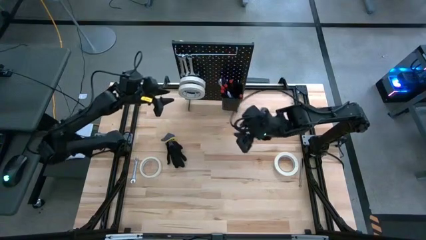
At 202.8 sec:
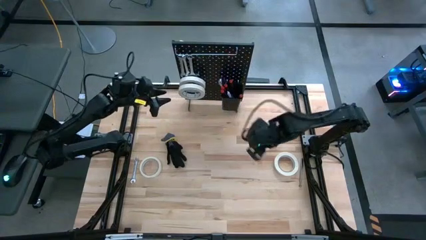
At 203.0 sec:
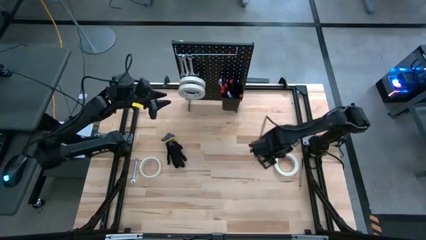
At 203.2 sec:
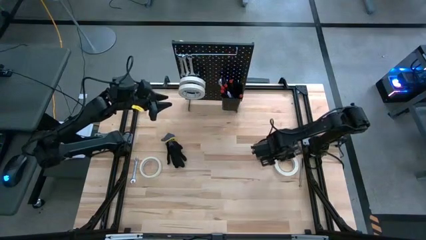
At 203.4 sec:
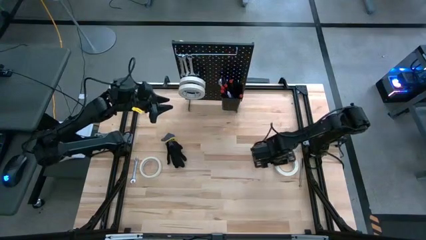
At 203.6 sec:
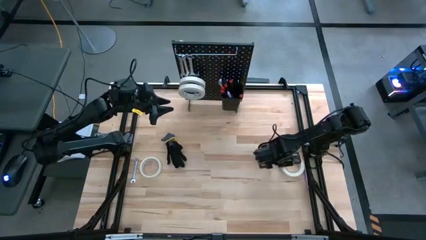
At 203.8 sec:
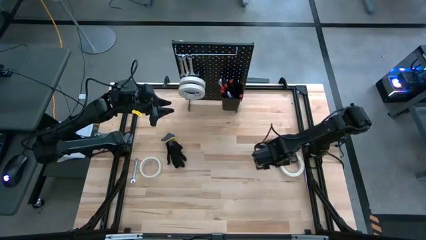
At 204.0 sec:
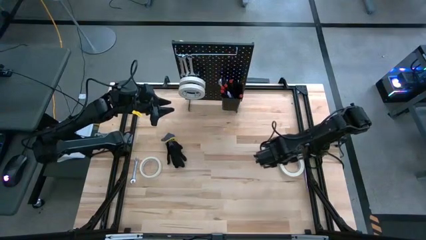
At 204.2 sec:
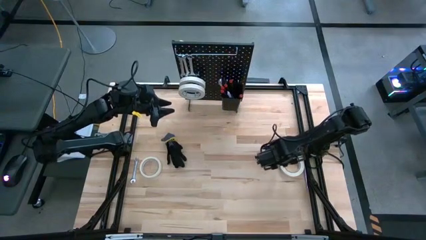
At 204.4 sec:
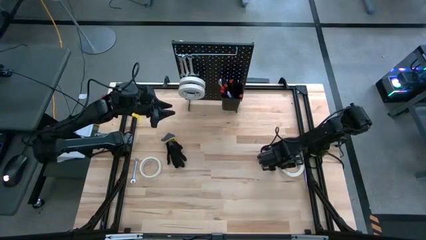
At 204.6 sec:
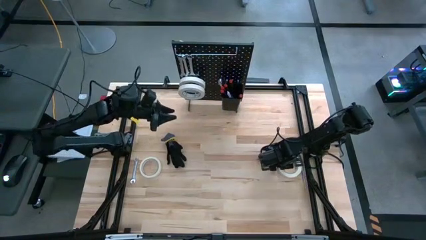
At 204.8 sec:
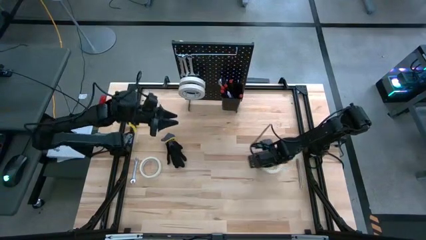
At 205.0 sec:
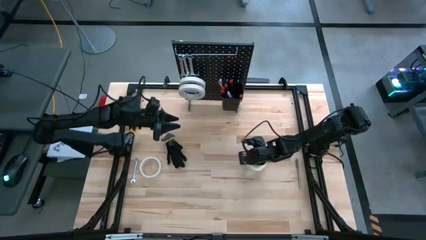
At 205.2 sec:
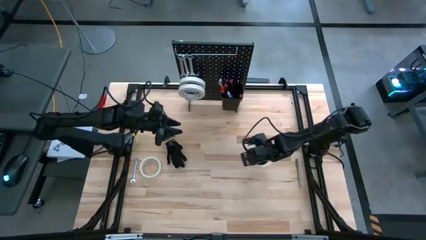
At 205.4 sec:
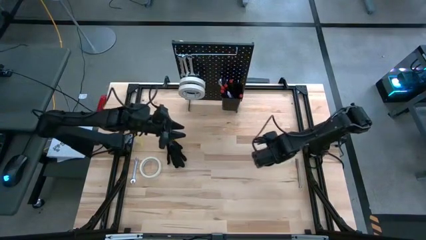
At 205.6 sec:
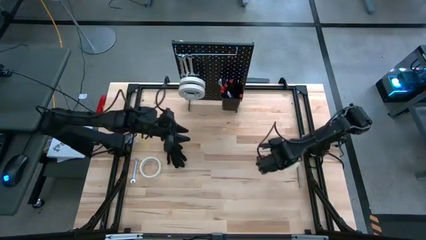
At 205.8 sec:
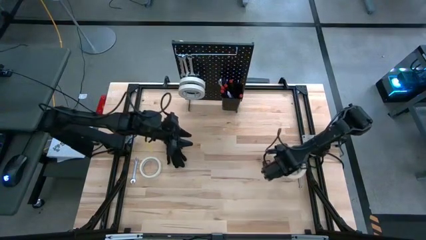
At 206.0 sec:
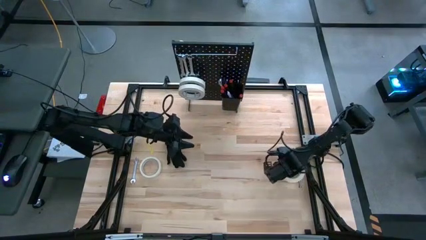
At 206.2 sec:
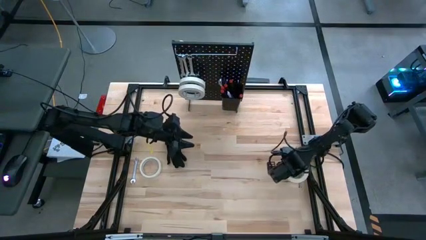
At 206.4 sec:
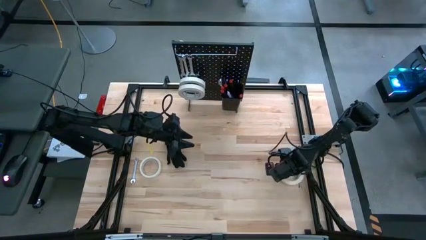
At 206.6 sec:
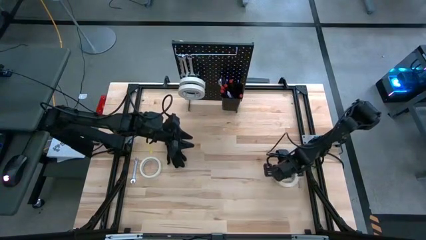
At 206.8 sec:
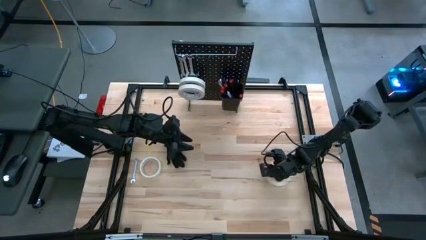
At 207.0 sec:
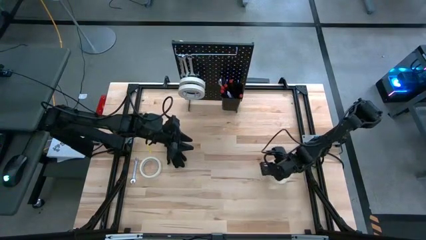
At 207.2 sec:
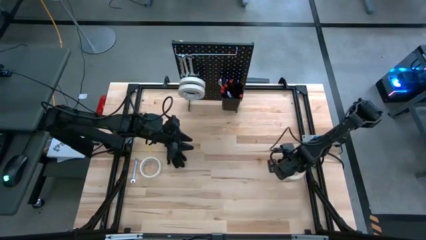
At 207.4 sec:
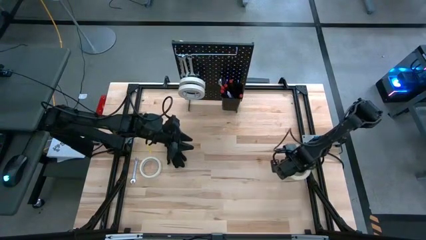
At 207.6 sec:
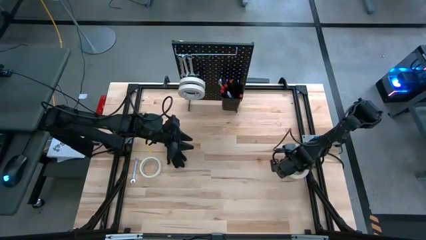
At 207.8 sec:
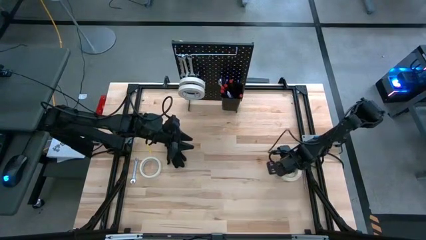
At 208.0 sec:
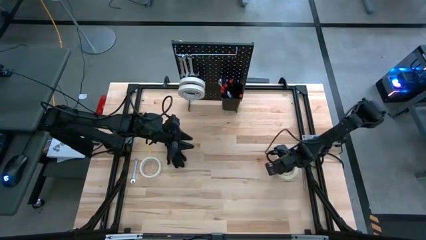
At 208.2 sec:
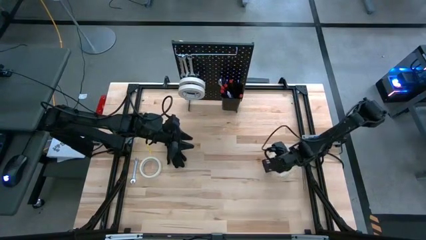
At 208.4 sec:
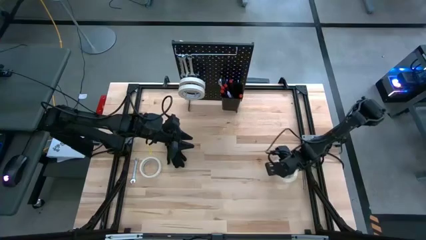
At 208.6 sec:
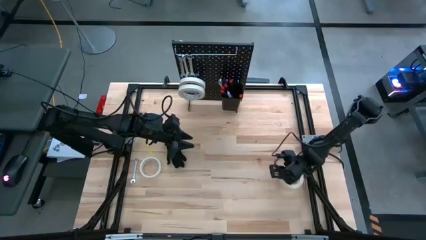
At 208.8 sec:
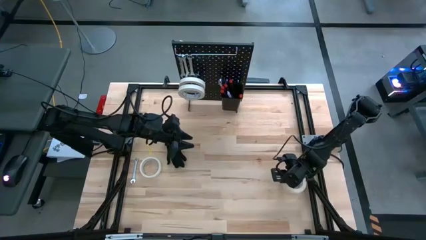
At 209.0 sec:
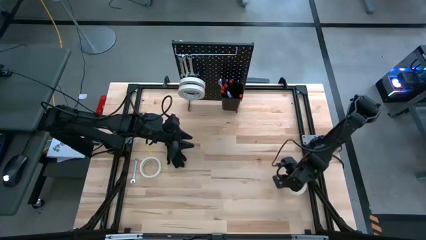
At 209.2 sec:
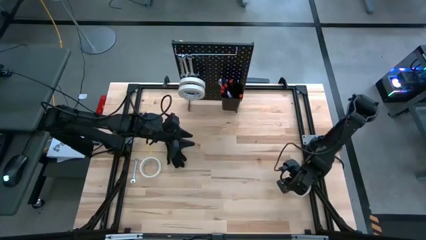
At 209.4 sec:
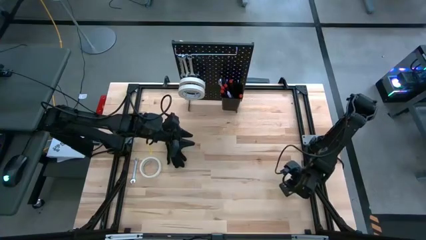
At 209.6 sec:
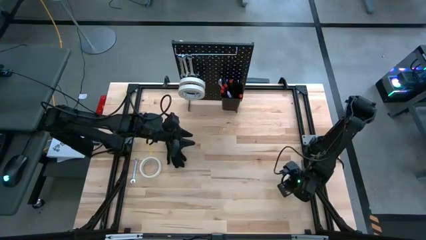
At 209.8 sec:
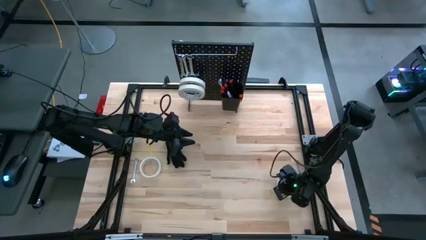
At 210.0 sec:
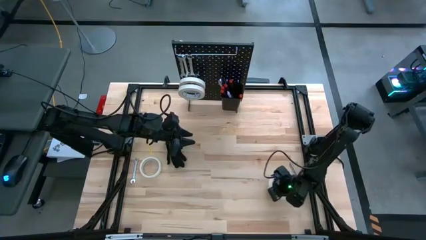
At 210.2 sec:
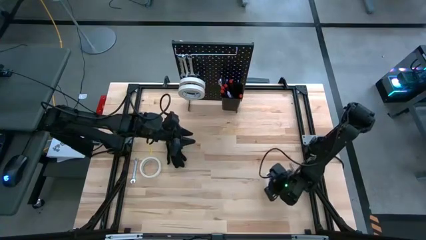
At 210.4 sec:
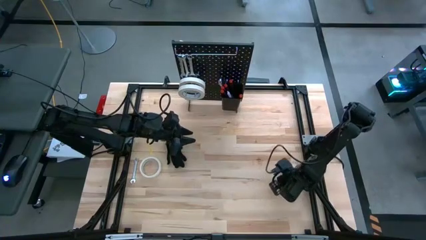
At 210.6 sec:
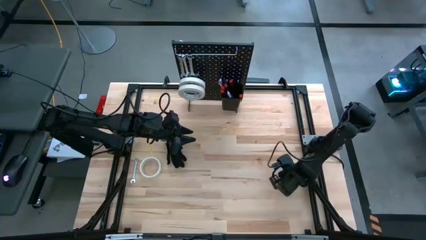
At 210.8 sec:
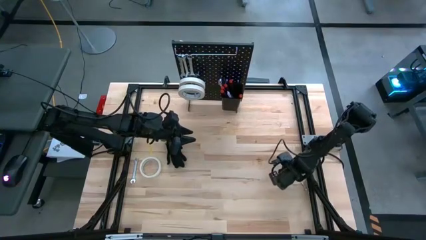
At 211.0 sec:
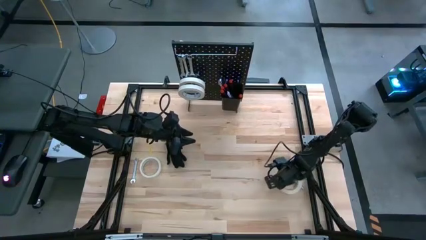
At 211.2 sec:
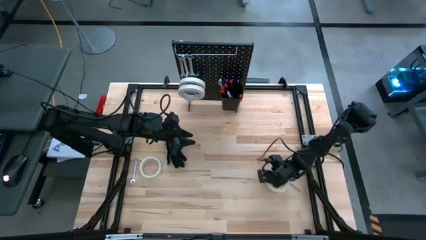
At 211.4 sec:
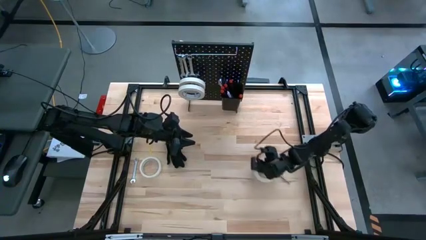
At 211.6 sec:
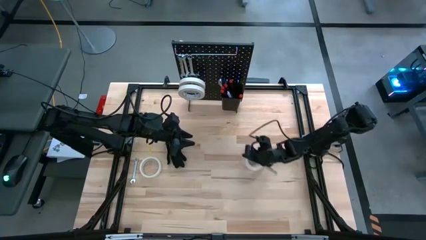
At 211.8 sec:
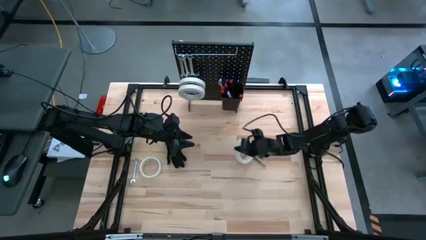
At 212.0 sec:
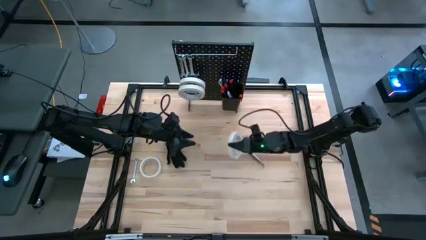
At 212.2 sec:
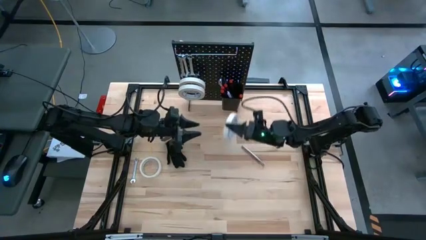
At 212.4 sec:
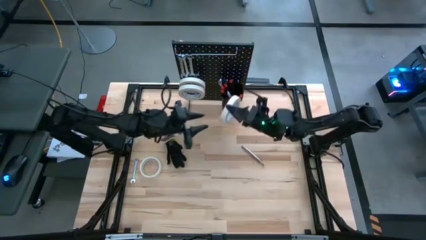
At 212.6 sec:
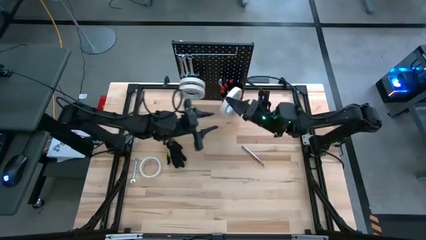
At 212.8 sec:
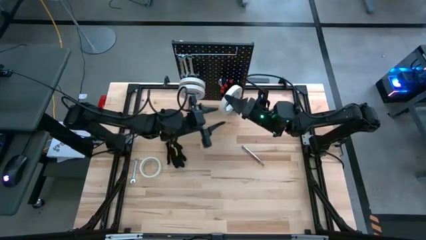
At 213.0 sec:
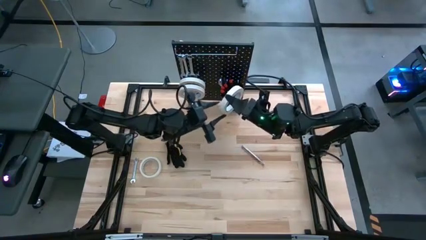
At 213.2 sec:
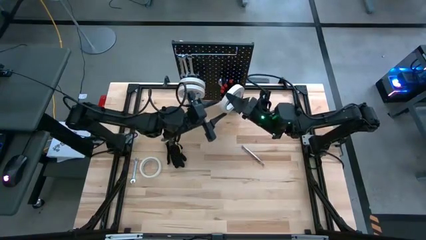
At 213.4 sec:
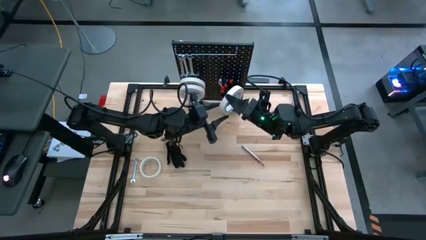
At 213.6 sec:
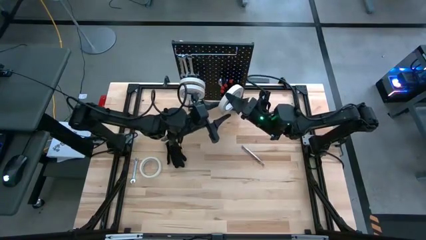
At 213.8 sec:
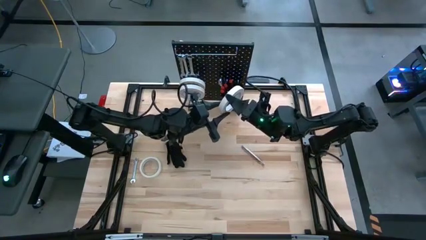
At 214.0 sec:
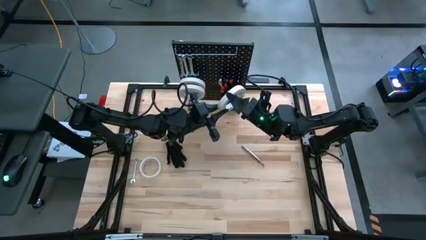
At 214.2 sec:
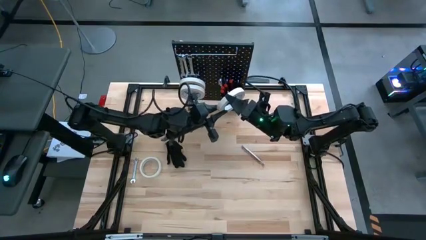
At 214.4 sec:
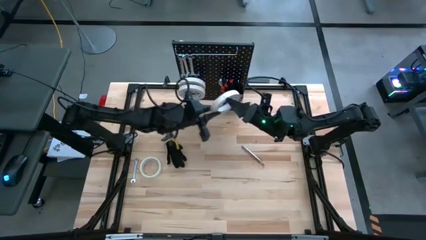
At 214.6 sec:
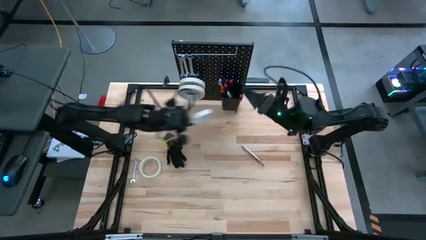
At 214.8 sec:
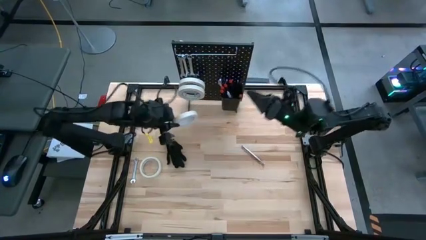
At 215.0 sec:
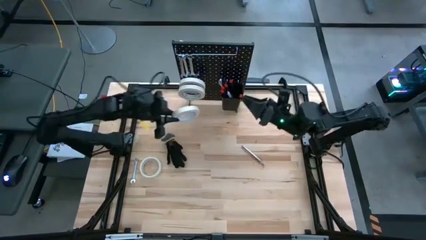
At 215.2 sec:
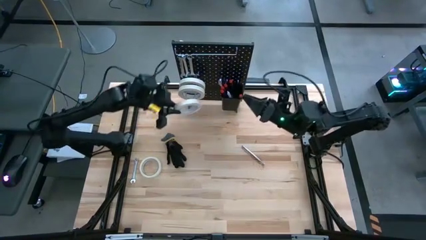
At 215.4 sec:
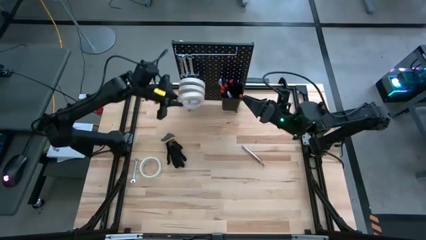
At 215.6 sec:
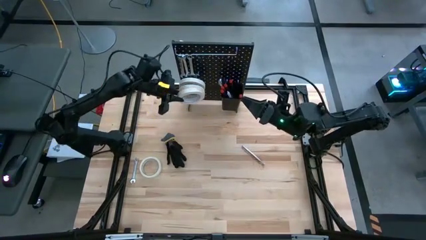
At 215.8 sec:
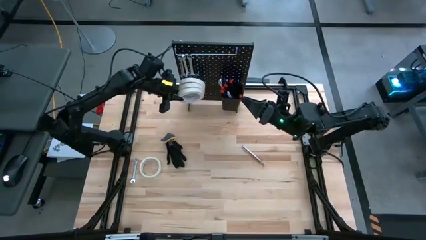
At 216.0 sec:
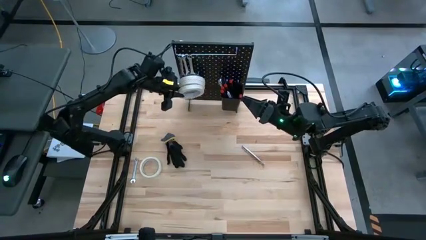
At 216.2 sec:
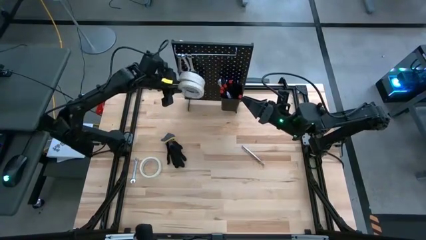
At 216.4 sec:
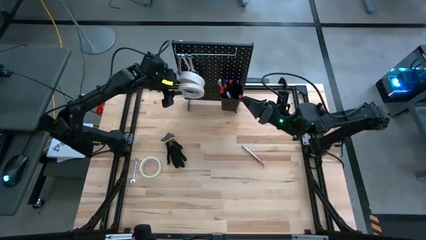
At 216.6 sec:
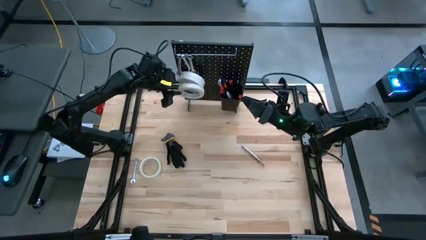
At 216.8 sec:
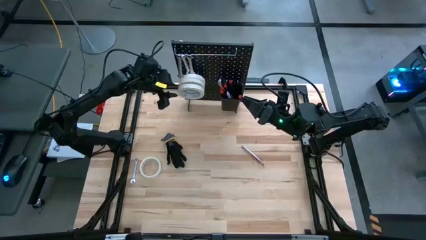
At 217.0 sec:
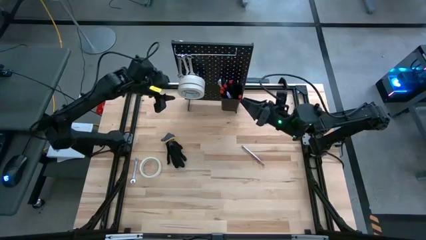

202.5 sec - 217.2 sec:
Task: Hang tools onto peg board
Hang the right tape onto the peg board
